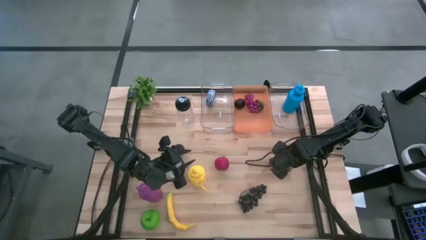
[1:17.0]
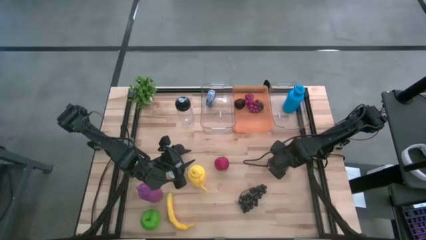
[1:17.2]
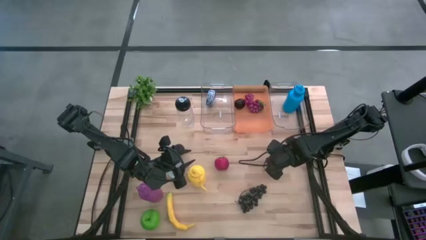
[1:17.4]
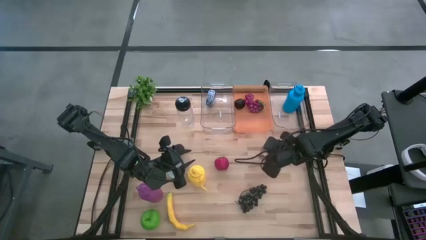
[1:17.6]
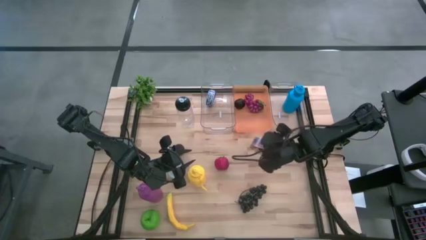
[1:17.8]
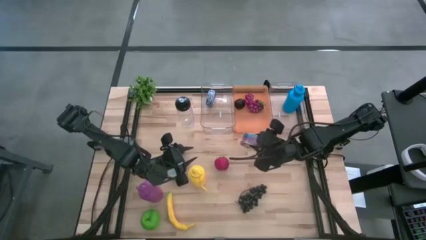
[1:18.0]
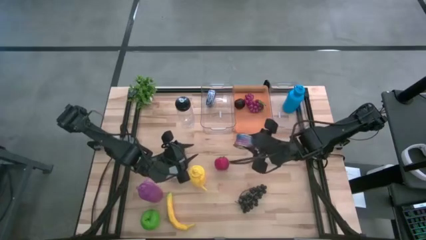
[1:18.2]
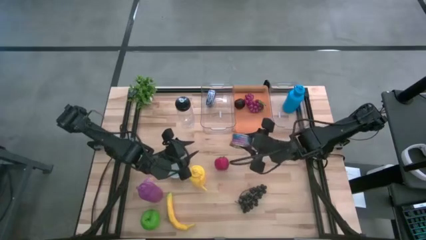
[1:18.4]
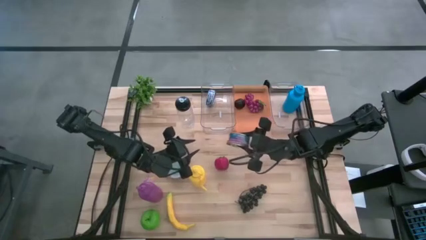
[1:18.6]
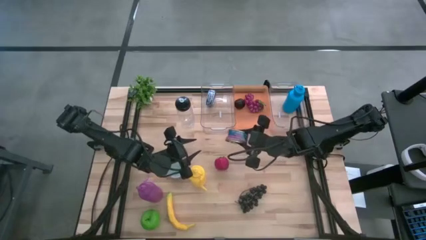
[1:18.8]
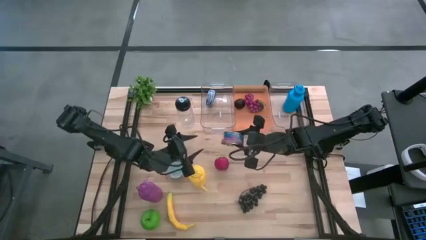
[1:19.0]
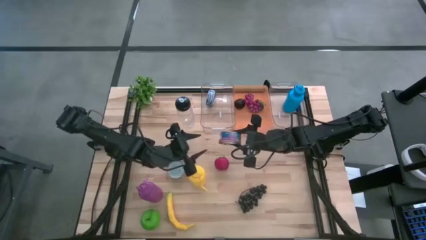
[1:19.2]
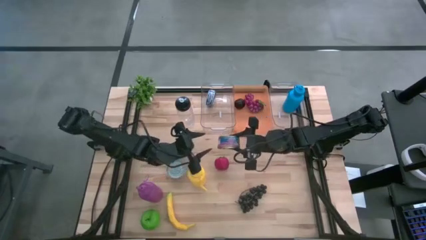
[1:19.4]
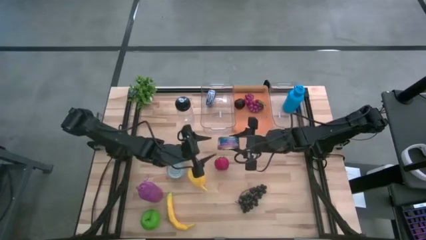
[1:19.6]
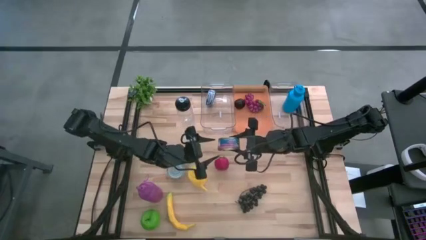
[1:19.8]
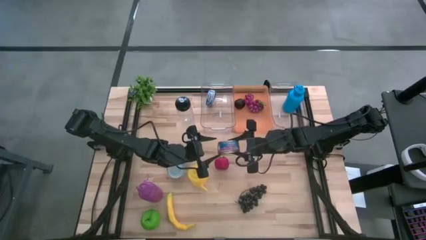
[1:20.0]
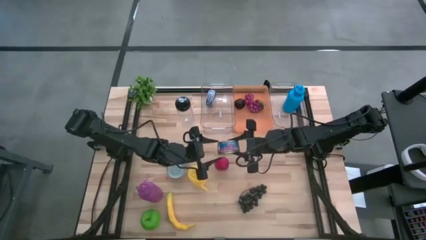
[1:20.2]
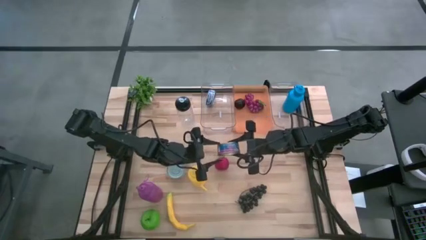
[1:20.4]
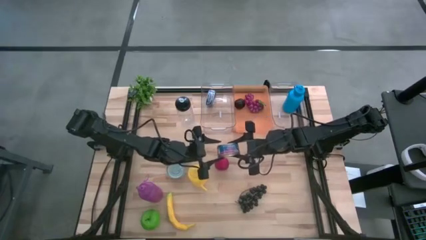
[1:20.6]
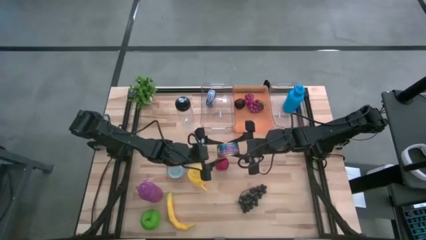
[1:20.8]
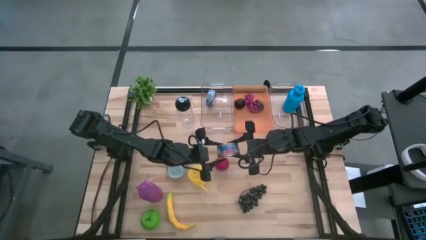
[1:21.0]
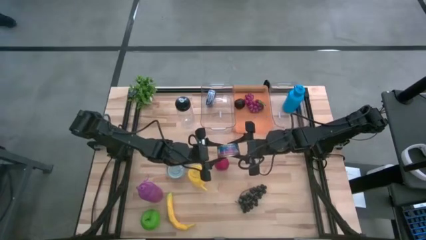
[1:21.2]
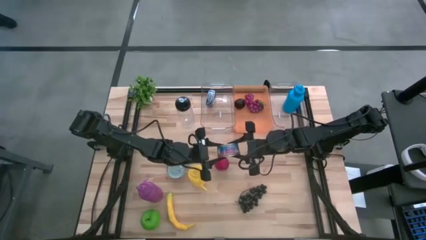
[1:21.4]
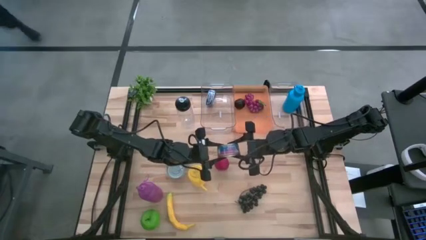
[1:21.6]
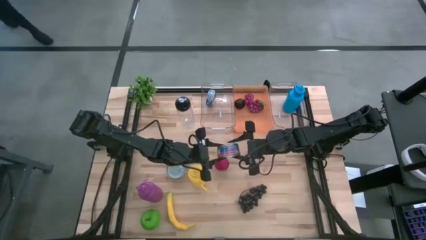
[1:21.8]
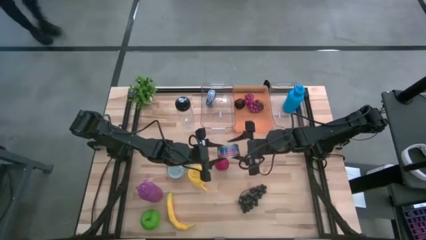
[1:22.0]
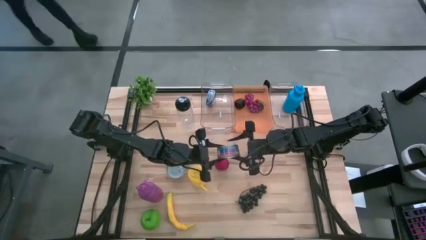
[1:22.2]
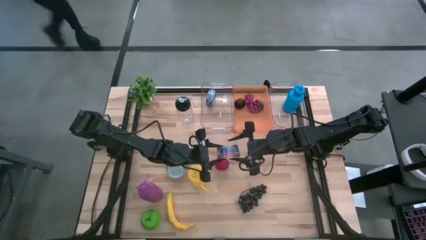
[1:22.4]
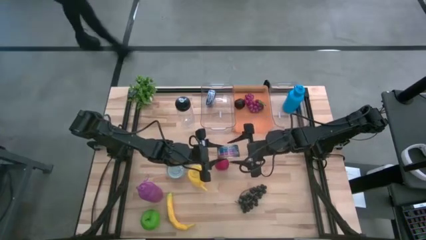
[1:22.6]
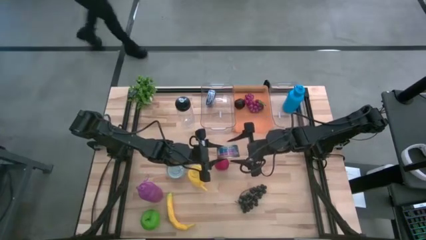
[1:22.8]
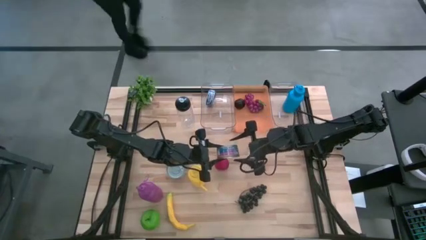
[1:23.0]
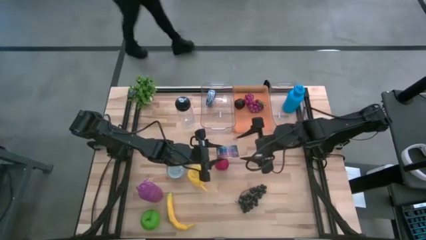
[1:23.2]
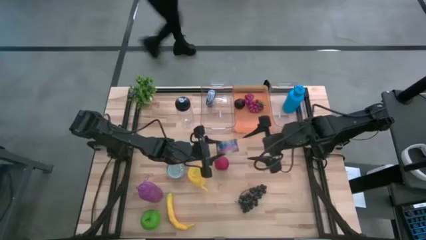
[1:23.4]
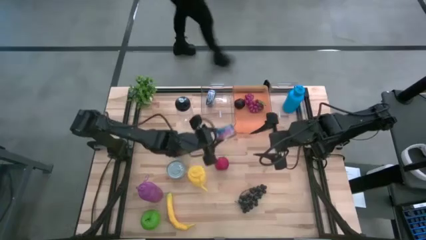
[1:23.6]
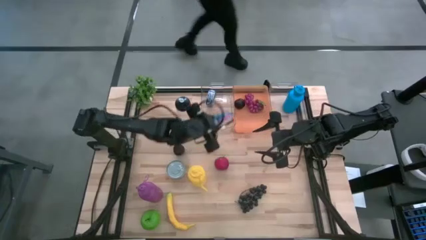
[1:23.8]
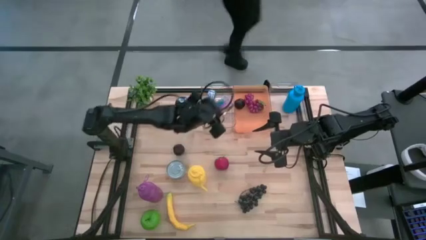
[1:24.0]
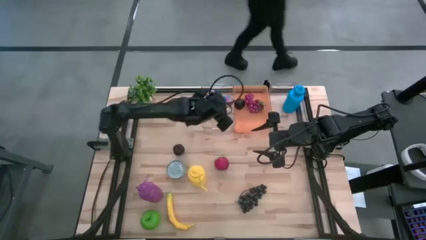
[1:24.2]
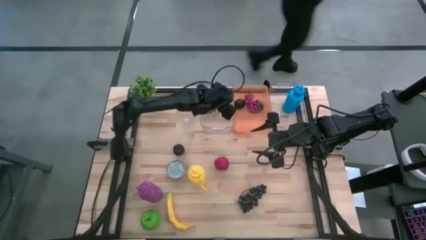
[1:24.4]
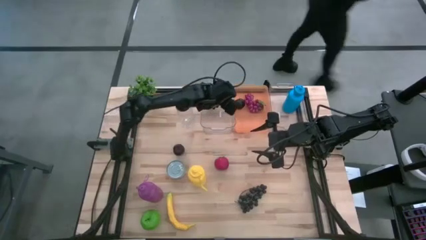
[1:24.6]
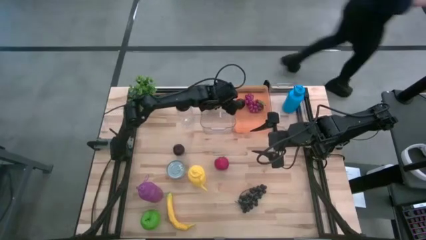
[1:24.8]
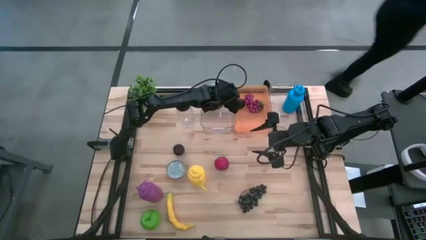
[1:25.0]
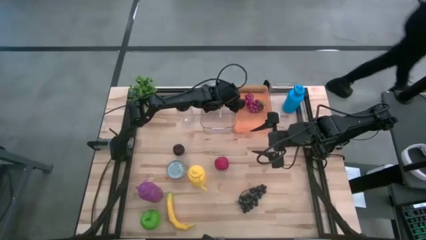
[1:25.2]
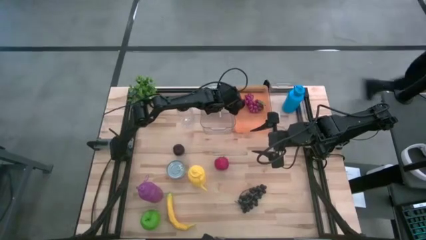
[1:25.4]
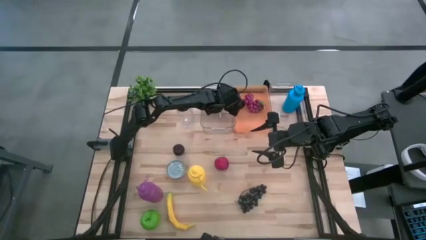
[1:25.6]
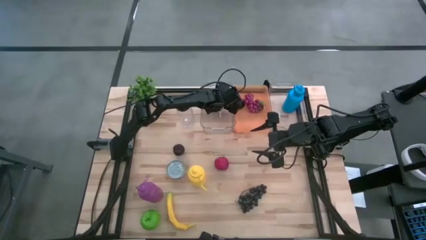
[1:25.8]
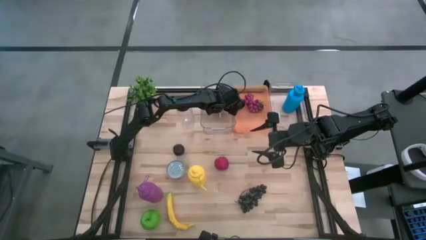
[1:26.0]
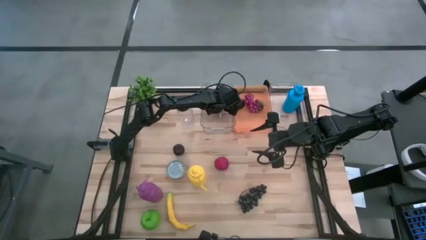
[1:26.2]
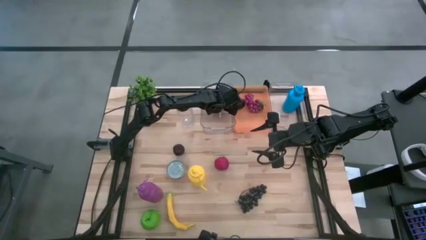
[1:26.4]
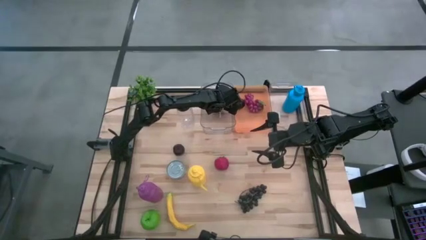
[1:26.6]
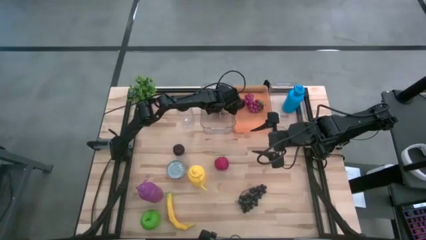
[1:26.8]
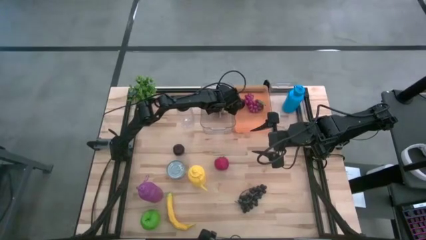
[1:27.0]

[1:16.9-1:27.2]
Task: Pick & Place Food Item
Put the blue and pink tuna can into the left transparent bin

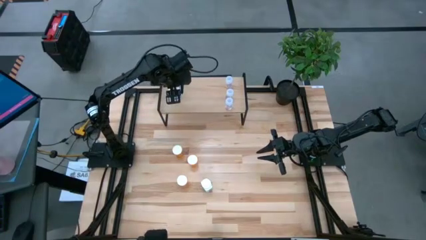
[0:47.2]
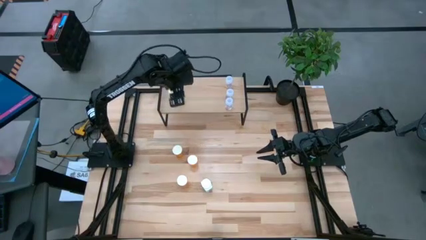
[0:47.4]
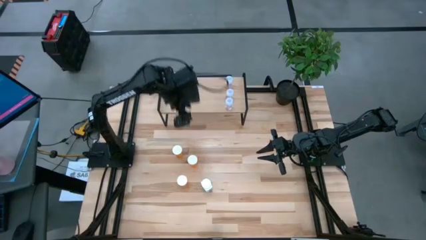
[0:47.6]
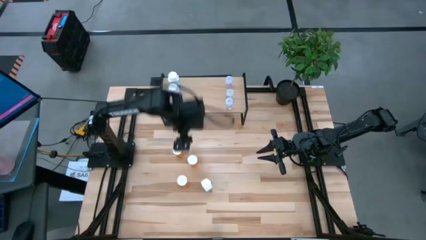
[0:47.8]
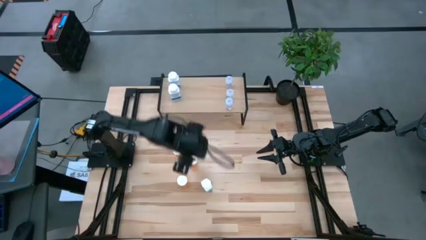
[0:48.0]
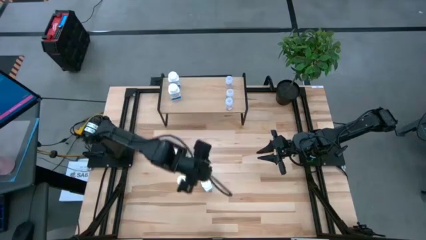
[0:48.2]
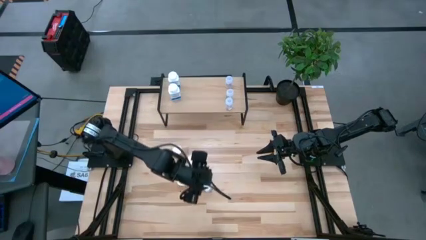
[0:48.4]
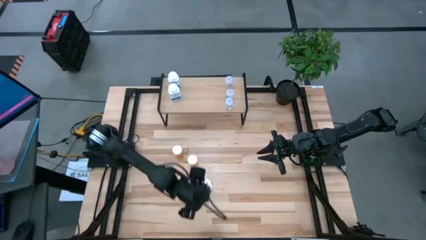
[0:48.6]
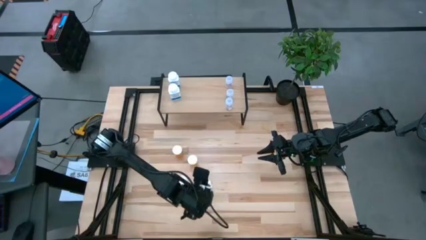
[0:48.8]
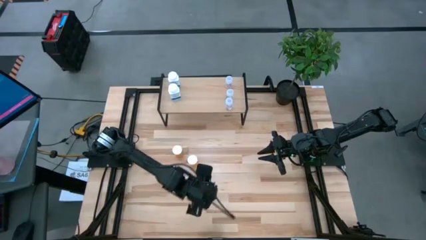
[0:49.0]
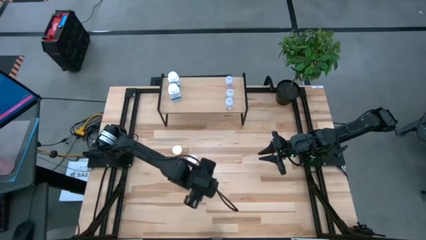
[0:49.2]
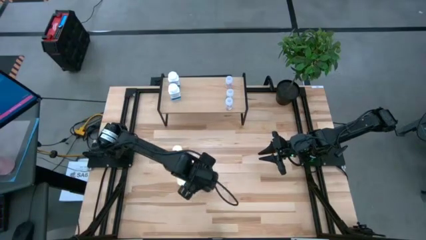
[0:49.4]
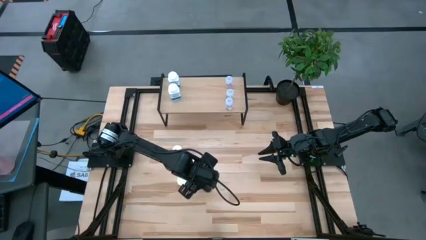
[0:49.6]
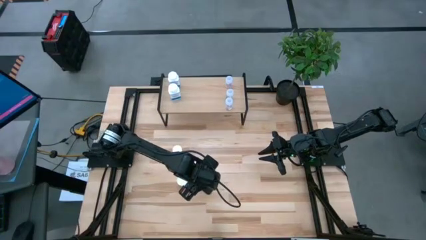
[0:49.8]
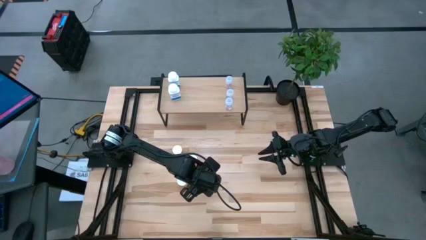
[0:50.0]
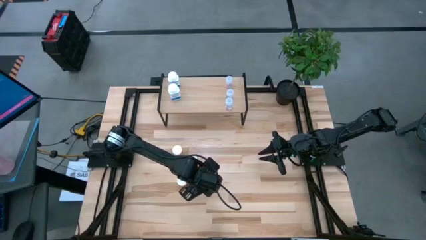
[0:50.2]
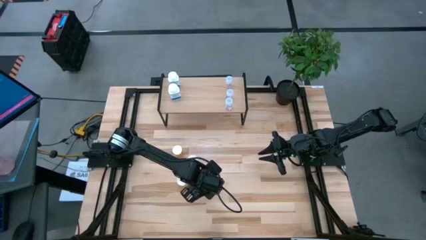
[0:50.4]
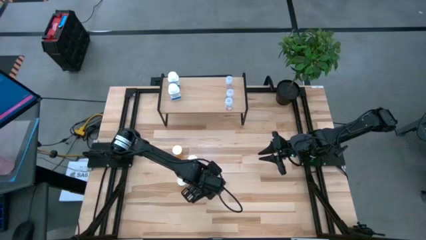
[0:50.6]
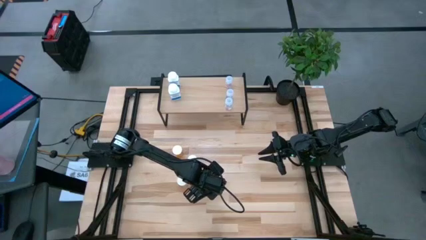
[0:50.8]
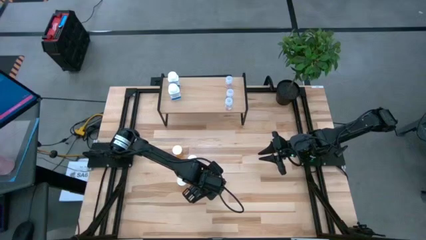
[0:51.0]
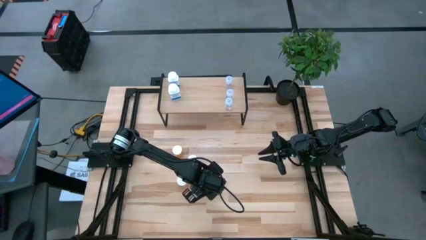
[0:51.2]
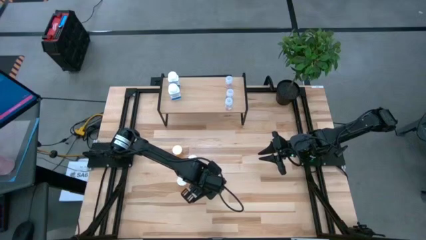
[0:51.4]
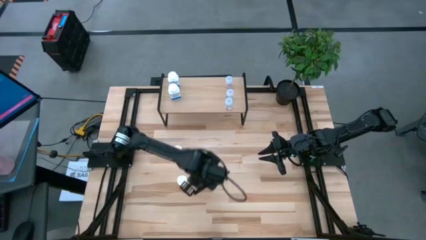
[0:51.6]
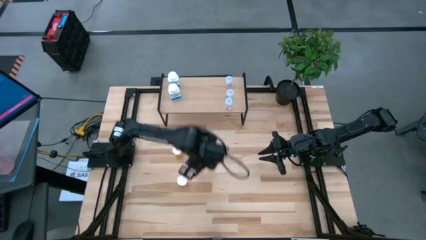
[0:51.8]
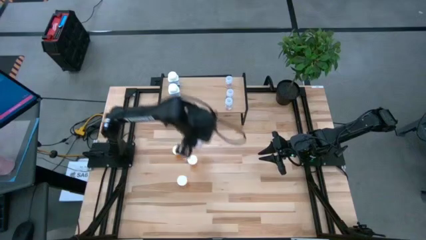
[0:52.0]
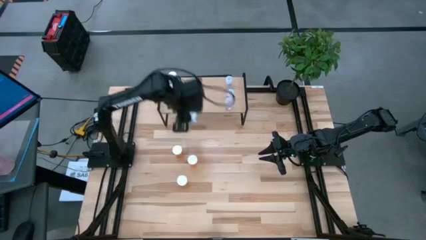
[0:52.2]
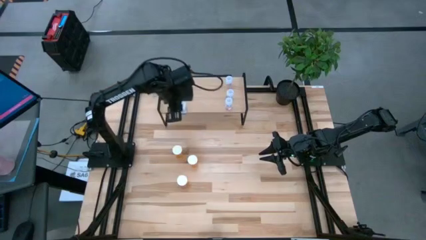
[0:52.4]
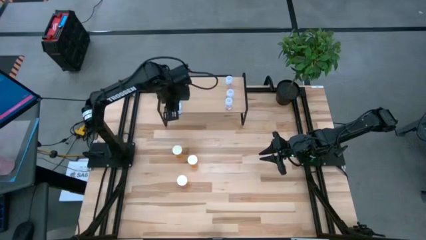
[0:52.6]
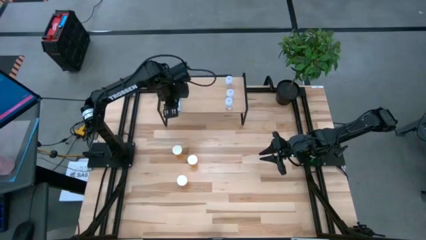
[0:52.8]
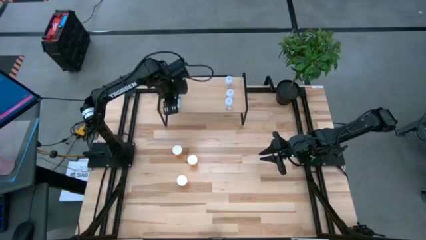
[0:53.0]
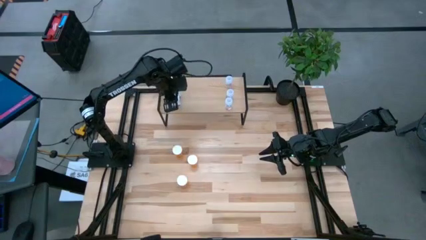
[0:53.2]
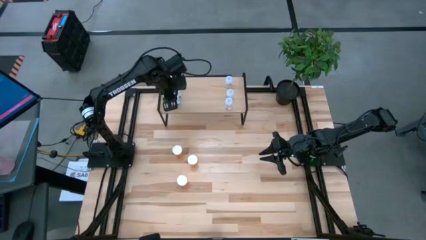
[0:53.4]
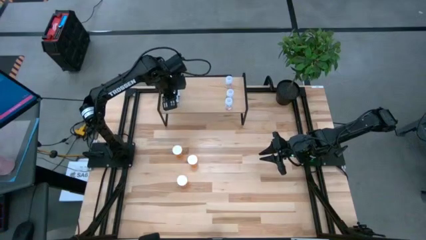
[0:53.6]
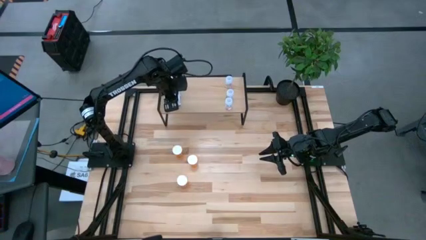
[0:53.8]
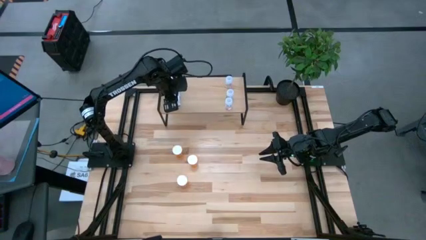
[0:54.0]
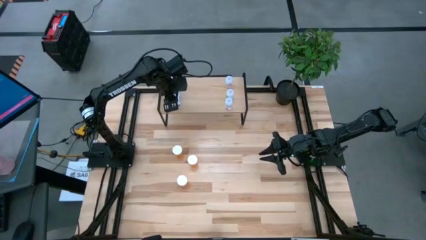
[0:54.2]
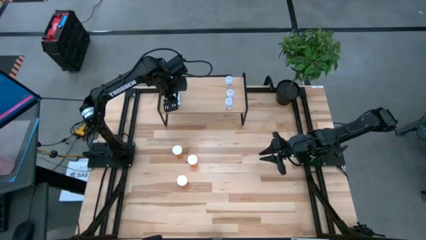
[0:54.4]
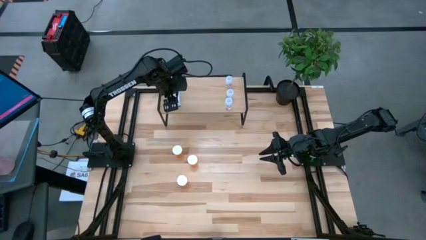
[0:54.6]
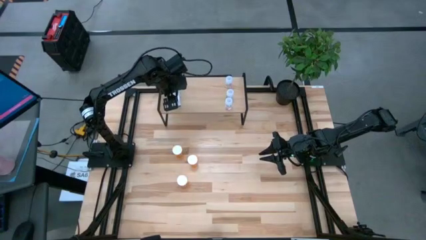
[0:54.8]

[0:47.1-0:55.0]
Task: Pick and place medicine bottles onto shelf by color
Put the white pill bottle on the shelf aligned with the other white pill bottles
